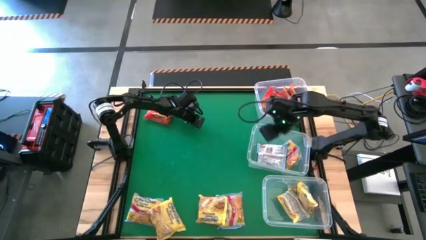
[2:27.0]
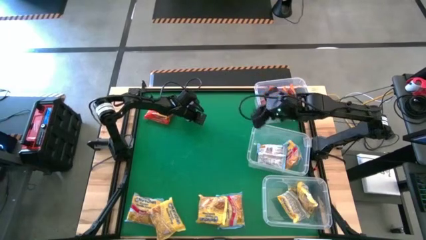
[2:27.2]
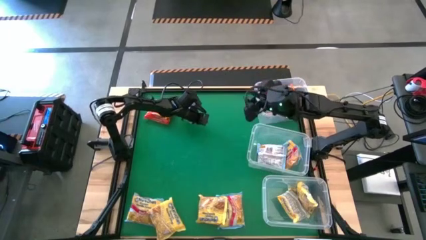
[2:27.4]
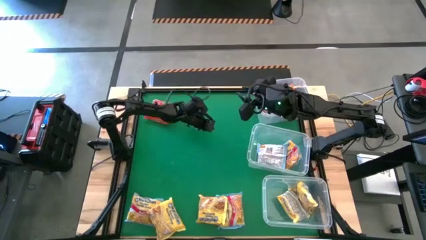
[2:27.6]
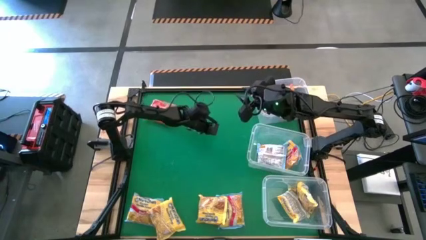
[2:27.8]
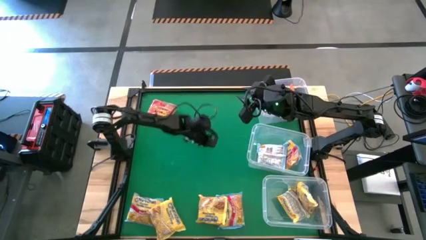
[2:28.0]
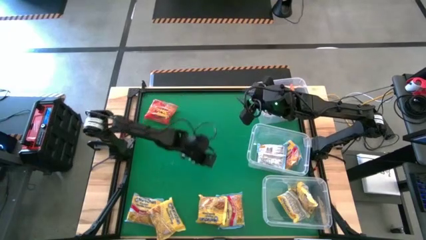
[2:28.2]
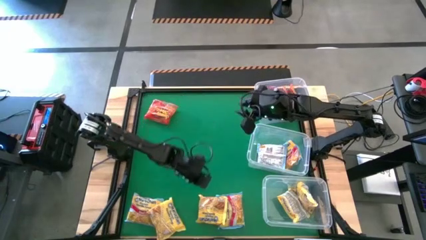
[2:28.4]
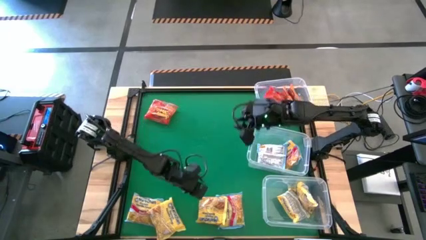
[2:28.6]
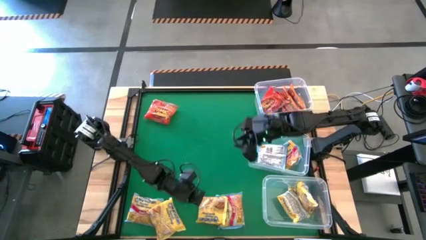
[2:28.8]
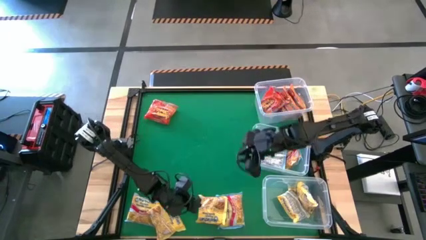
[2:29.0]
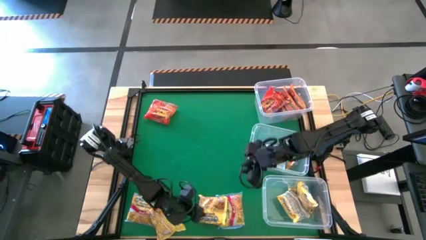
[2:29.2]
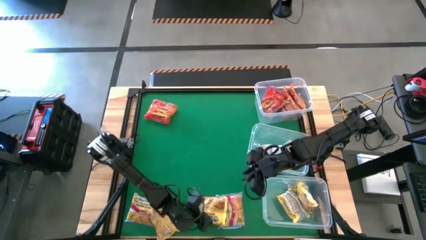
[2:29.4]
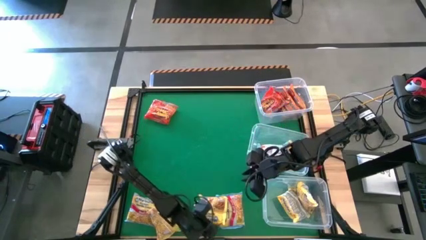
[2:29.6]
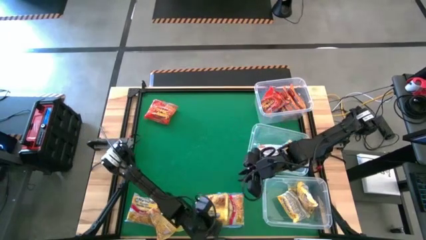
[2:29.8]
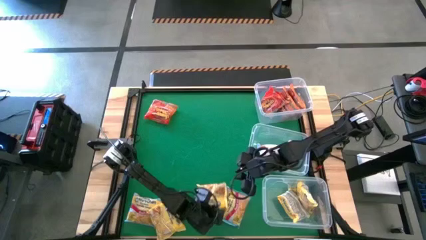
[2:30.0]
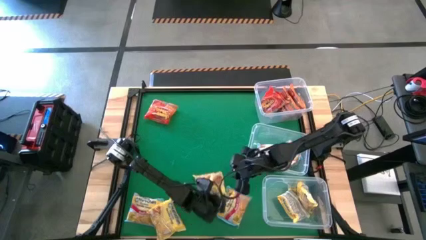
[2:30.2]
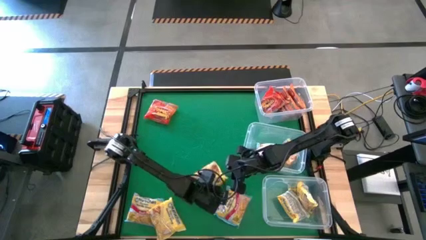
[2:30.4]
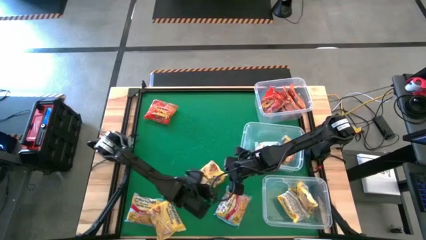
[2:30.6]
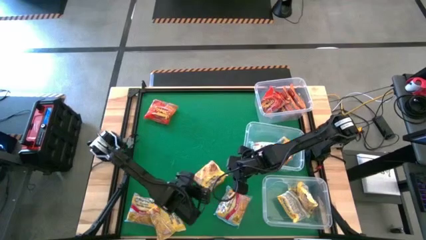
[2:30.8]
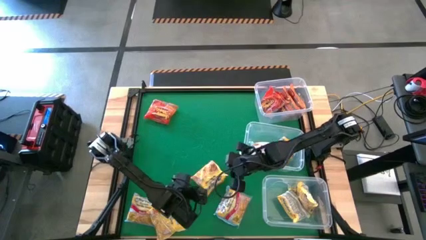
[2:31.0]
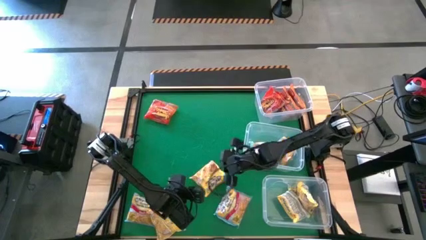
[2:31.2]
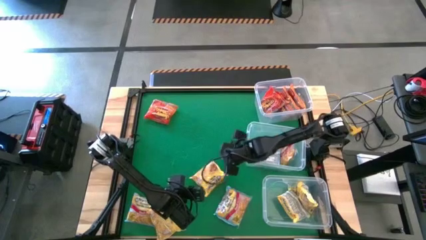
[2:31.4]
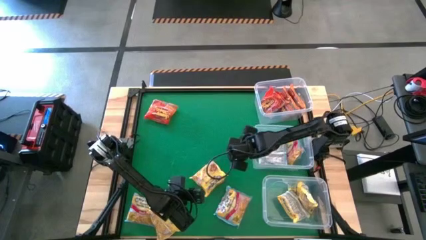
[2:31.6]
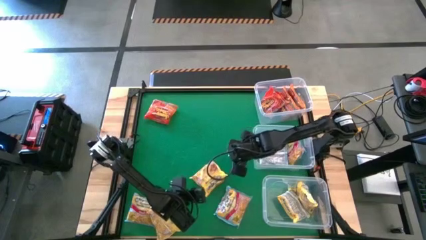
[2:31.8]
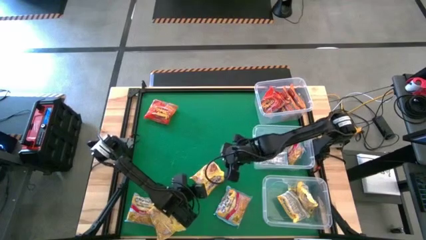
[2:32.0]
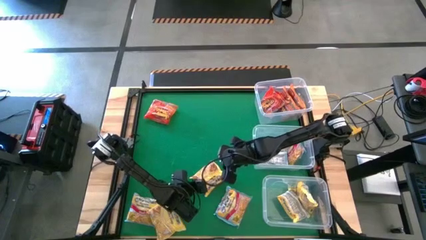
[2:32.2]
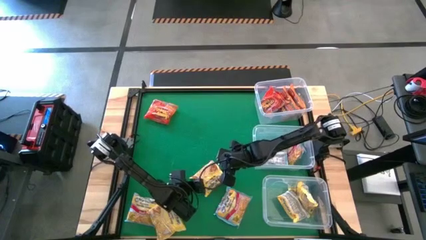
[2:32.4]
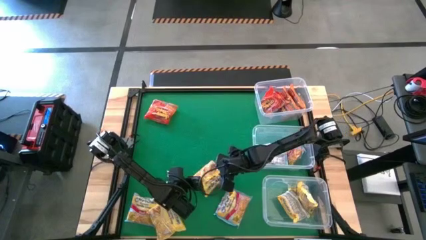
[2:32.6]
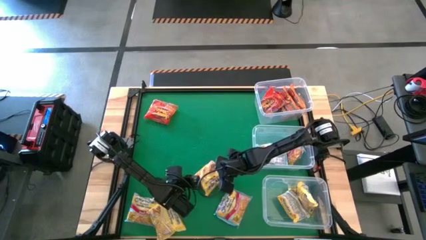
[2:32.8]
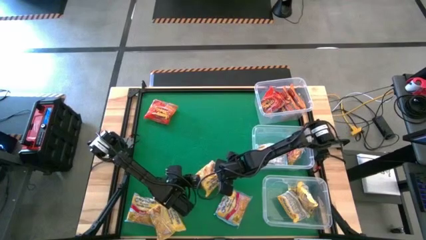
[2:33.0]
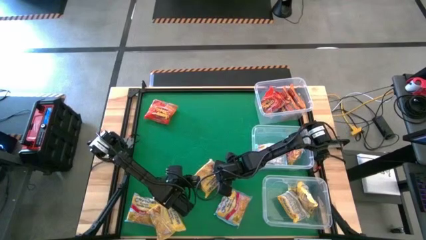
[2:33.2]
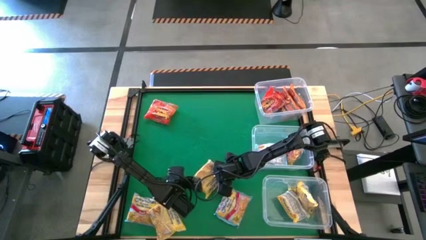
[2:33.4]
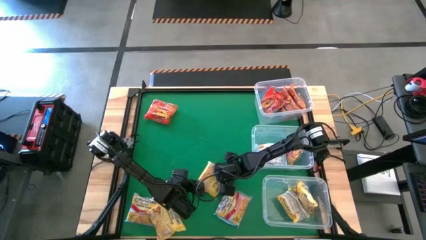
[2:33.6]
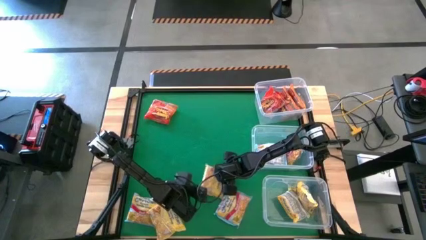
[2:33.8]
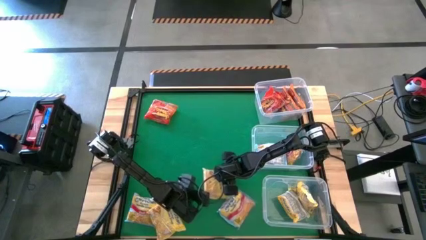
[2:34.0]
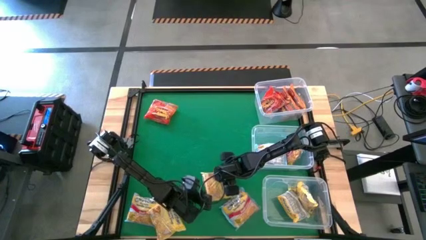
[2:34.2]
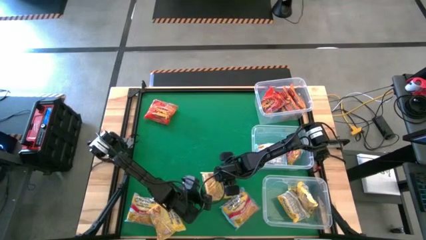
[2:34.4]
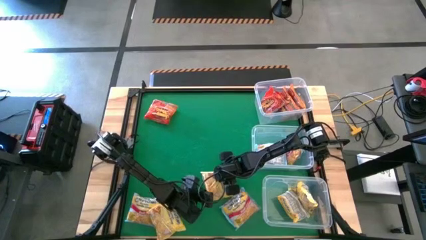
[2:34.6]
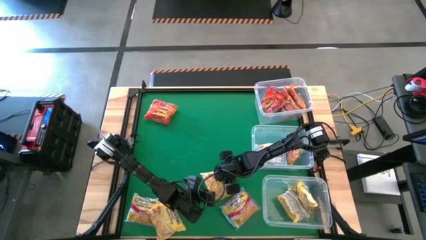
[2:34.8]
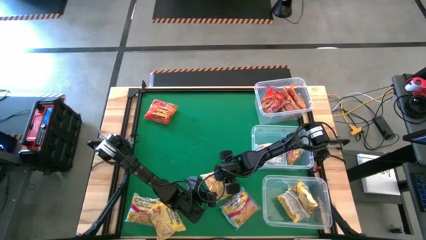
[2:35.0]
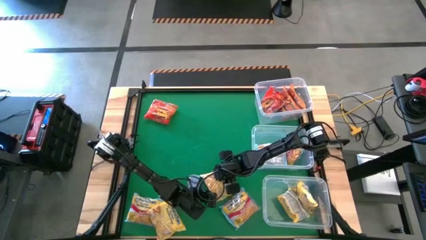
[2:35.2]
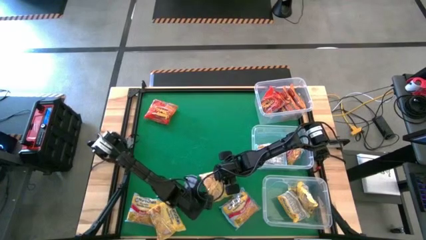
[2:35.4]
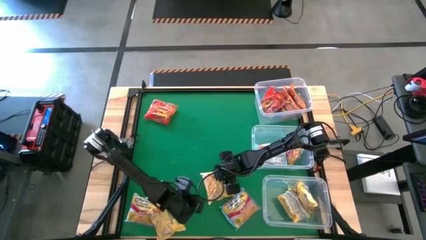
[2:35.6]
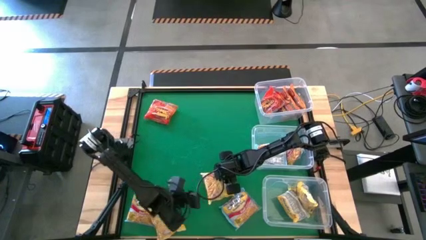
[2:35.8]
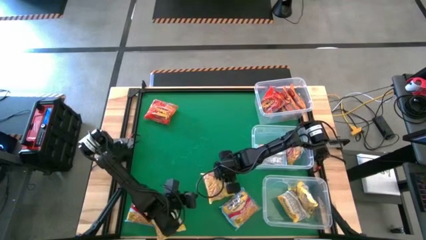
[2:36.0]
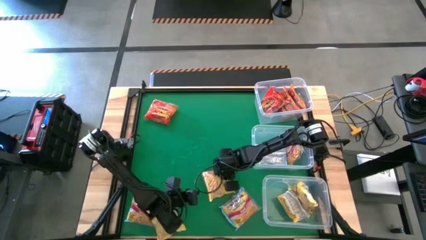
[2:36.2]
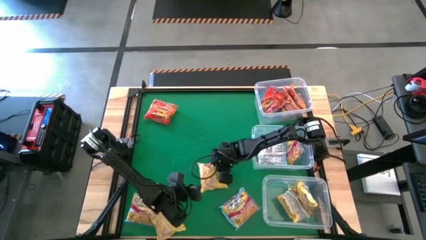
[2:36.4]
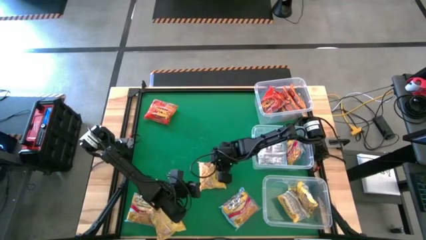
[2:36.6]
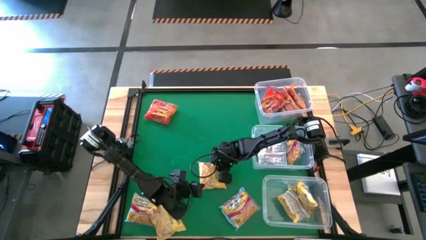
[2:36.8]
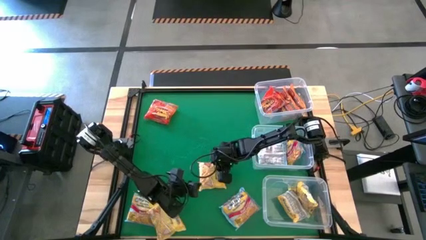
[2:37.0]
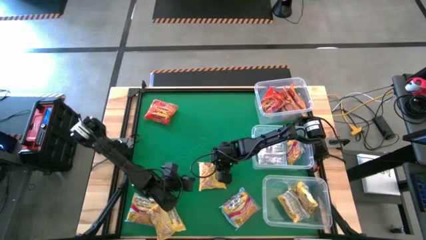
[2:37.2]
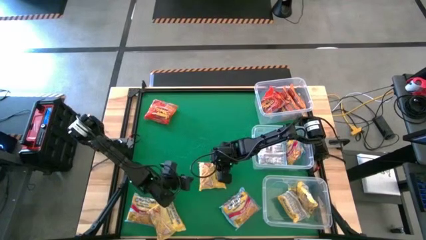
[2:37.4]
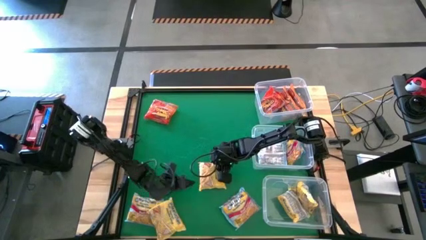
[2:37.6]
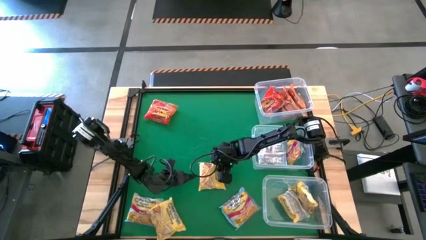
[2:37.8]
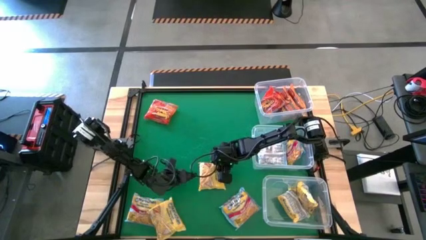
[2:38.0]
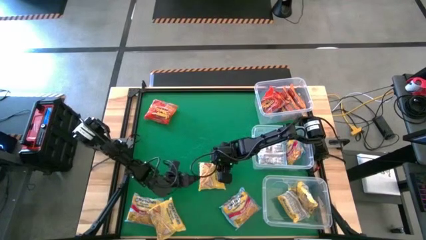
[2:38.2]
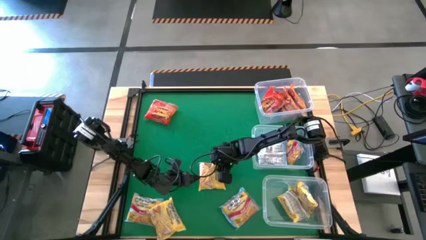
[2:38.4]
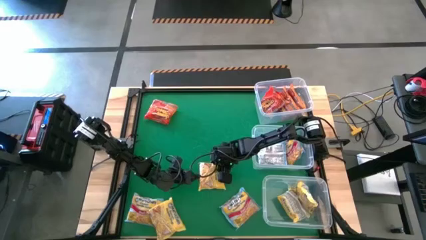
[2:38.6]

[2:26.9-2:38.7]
Task: Sort Maruchan noodles
Put the bottom right yellow noodle pack into the bottom transparent bin

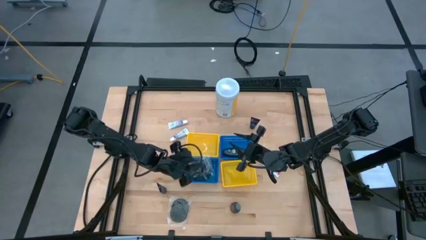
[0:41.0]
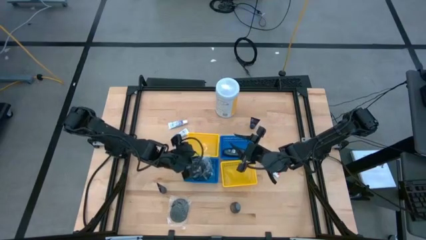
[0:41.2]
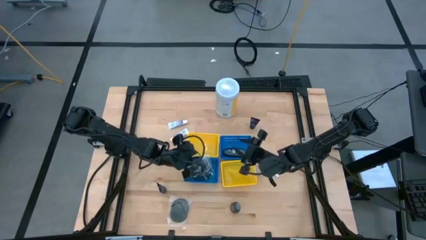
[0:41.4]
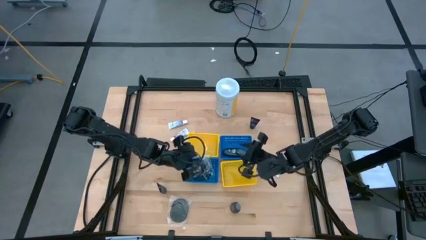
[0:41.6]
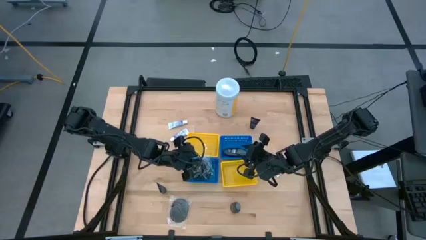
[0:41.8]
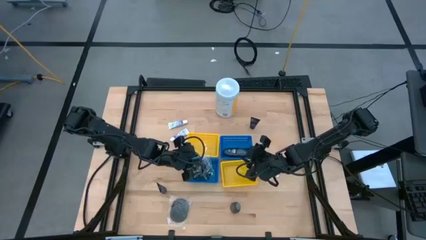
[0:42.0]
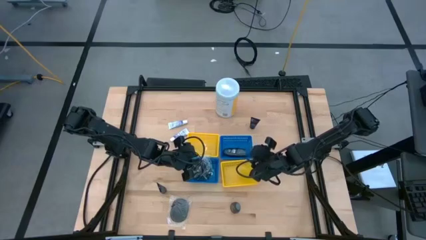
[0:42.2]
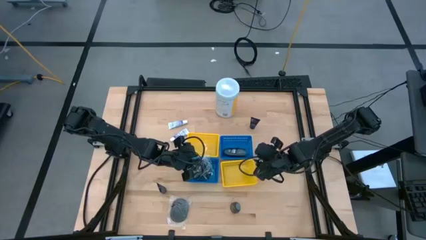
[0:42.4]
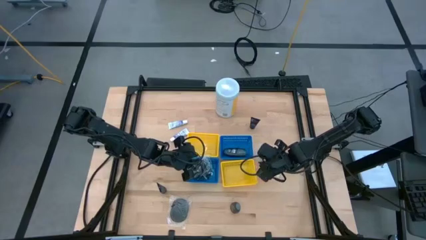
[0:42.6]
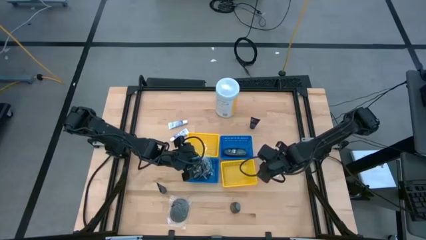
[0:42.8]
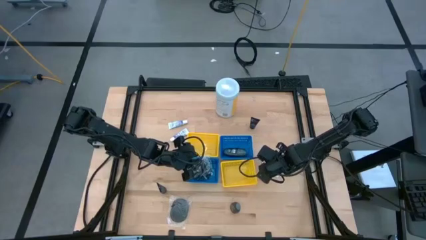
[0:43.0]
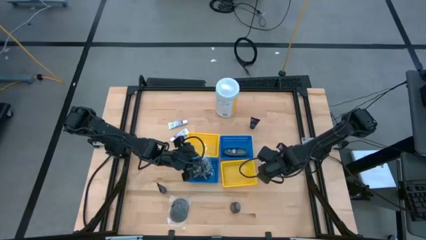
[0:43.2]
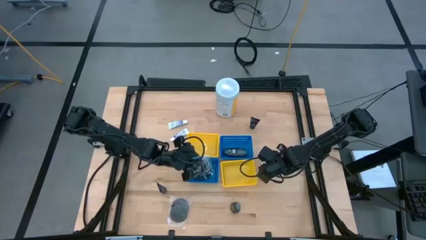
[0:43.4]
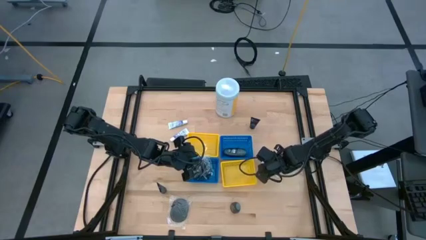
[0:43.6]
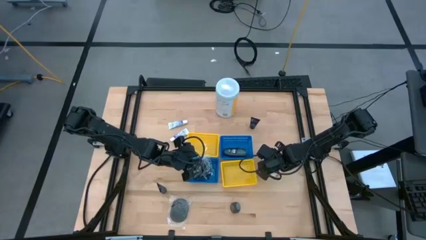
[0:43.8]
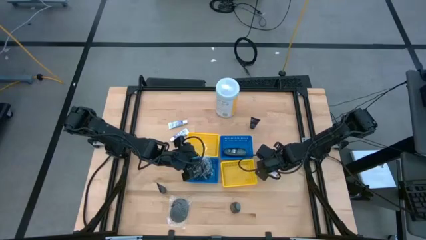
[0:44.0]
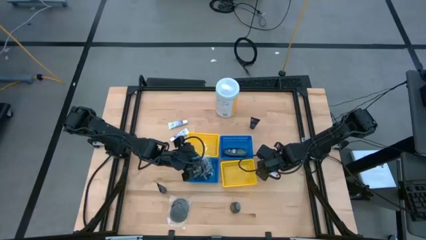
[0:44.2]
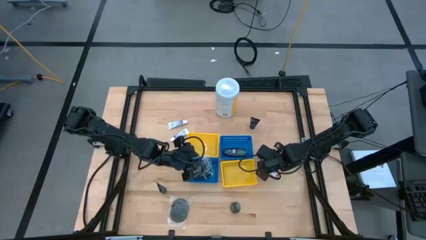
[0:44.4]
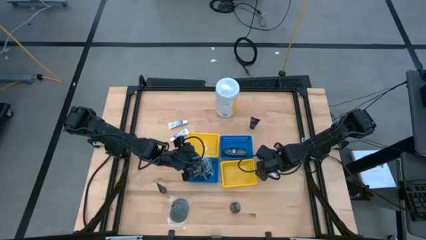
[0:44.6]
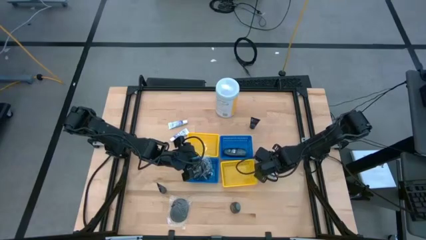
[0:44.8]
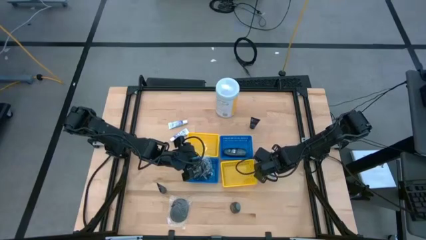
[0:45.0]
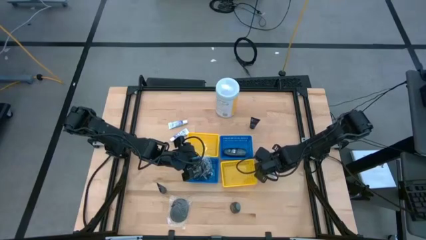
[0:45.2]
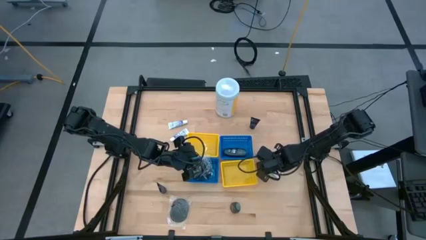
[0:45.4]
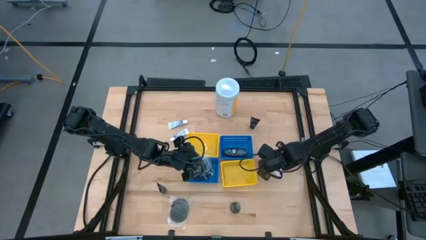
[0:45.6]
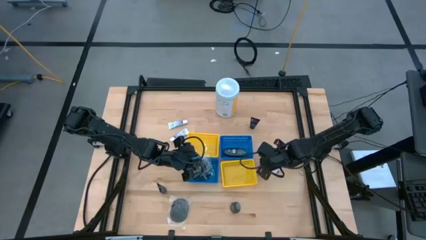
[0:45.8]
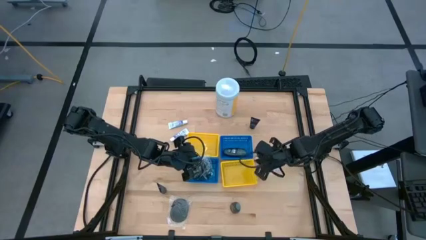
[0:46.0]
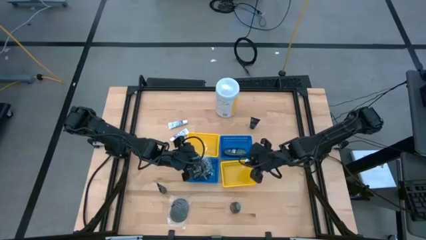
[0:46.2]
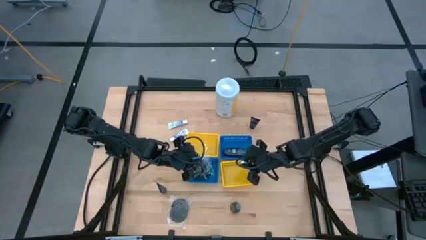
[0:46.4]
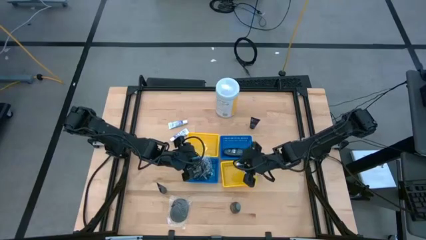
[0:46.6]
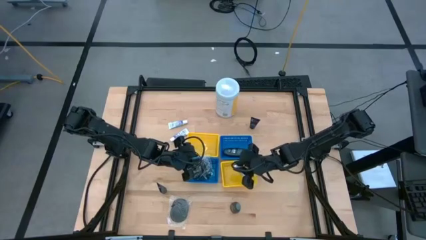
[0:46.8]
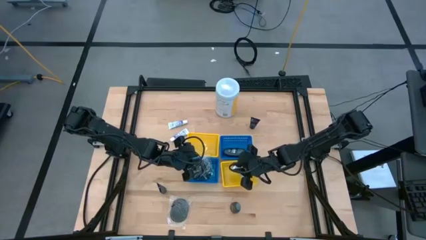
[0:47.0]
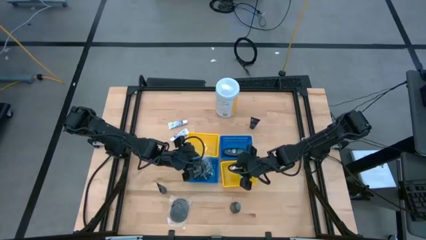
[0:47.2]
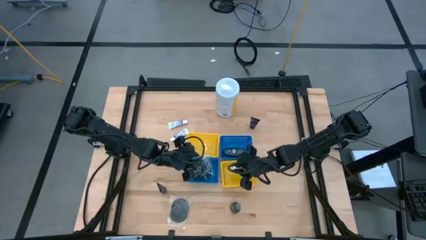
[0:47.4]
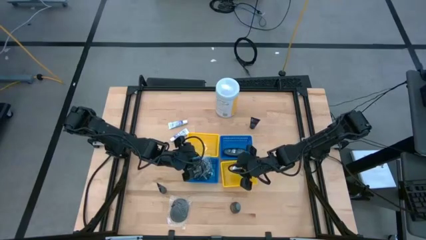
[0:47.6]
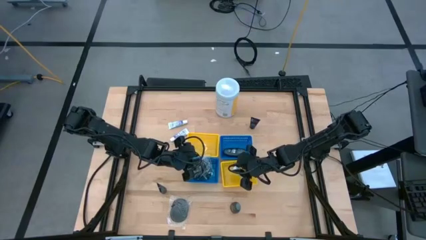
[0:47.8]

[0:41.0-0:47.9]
Task: Pick & Place Travel size toiletries
Put the white toothpaste into the bottom yellow bin
